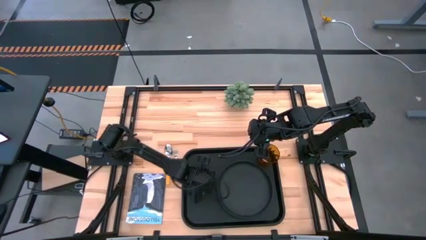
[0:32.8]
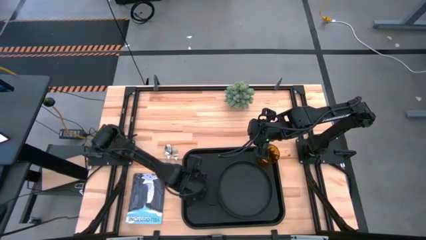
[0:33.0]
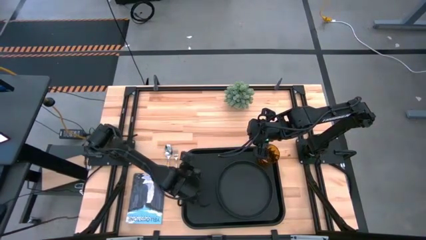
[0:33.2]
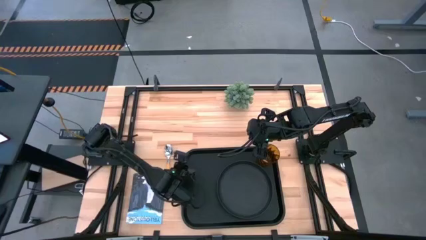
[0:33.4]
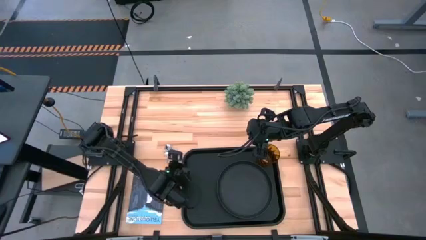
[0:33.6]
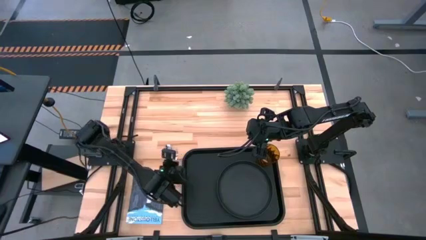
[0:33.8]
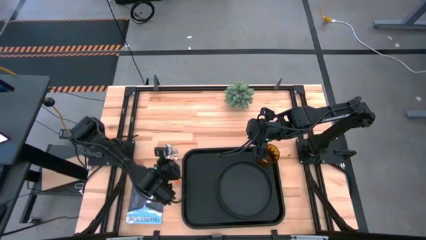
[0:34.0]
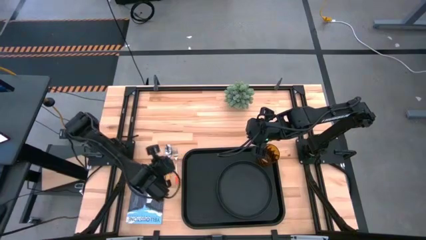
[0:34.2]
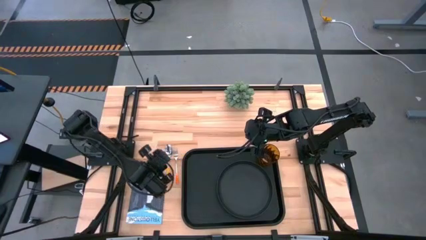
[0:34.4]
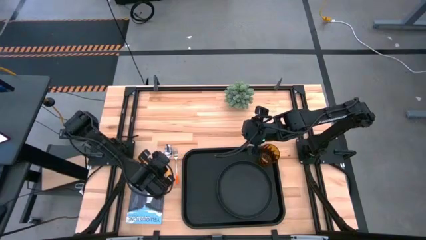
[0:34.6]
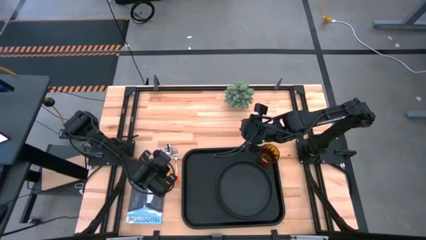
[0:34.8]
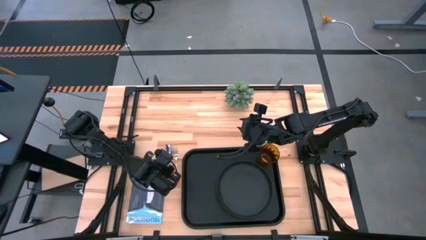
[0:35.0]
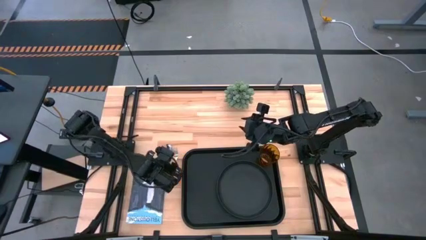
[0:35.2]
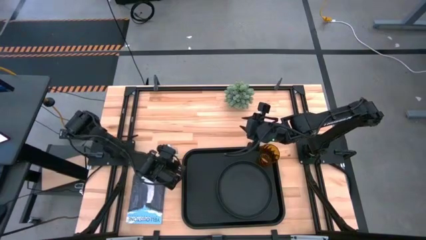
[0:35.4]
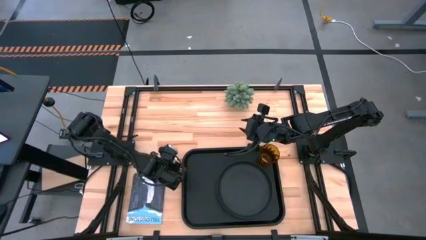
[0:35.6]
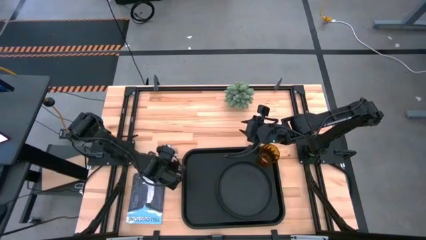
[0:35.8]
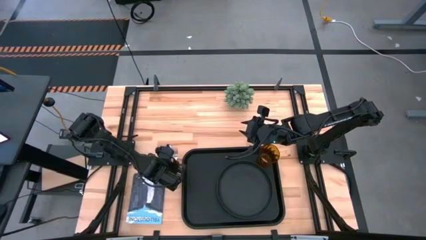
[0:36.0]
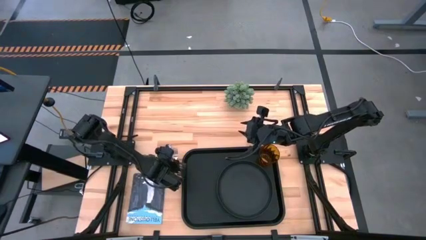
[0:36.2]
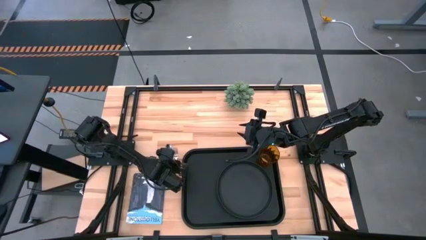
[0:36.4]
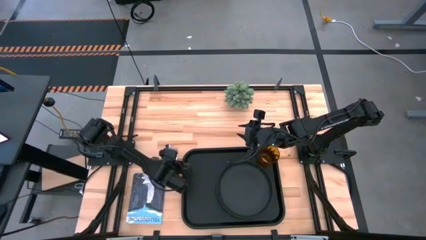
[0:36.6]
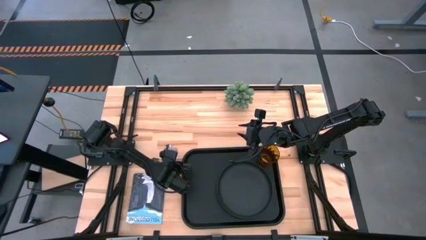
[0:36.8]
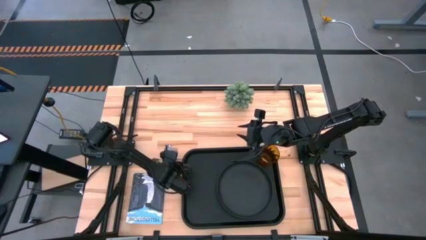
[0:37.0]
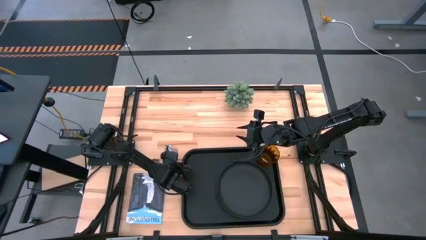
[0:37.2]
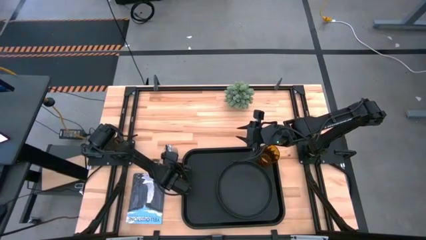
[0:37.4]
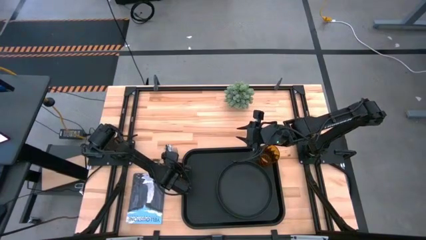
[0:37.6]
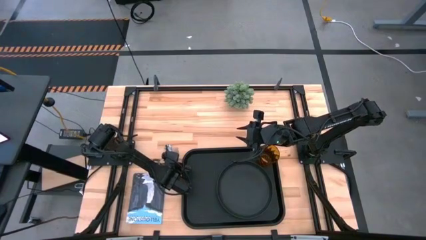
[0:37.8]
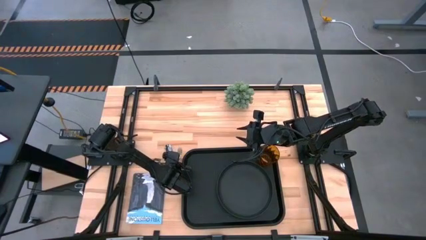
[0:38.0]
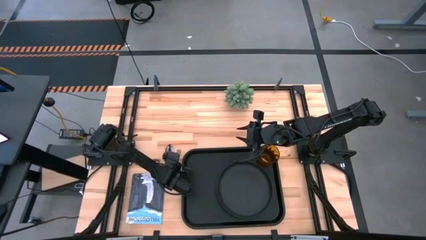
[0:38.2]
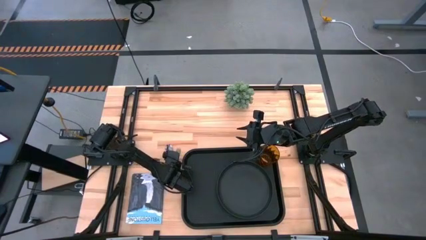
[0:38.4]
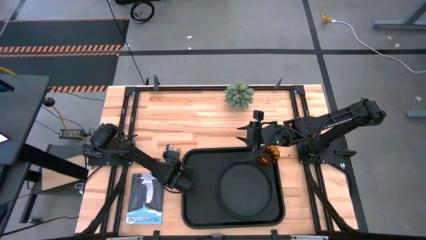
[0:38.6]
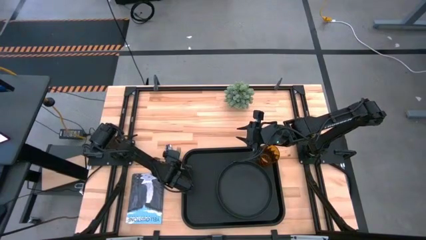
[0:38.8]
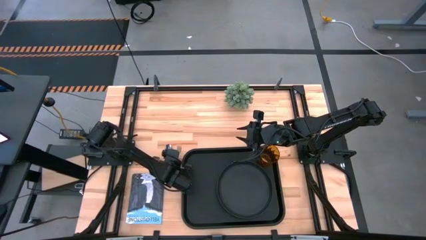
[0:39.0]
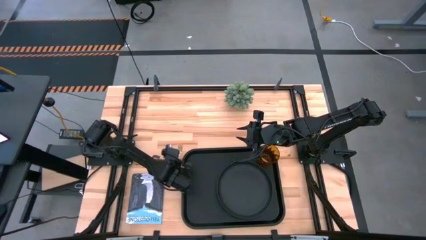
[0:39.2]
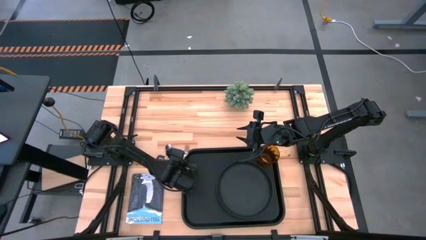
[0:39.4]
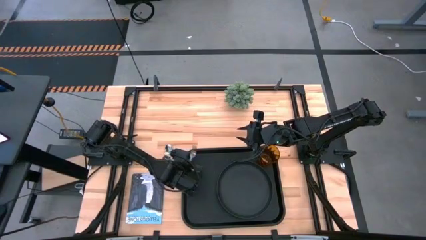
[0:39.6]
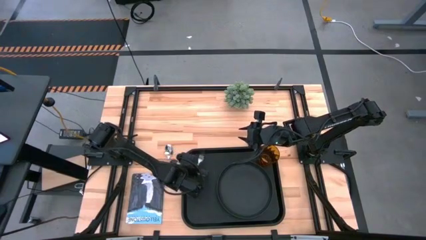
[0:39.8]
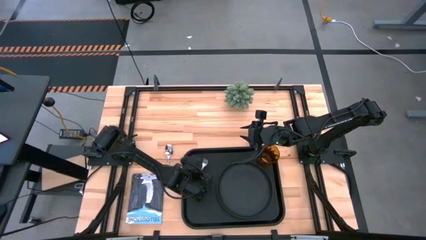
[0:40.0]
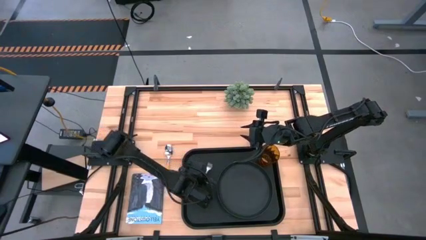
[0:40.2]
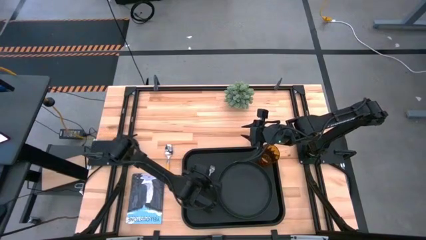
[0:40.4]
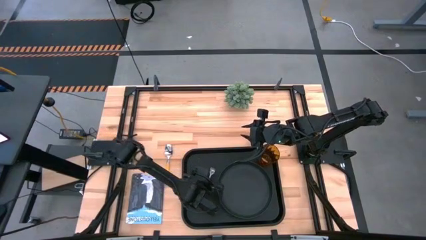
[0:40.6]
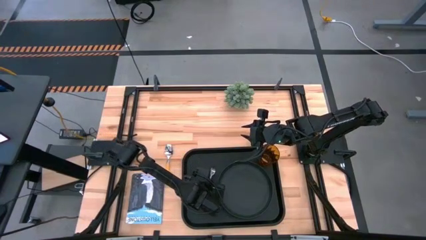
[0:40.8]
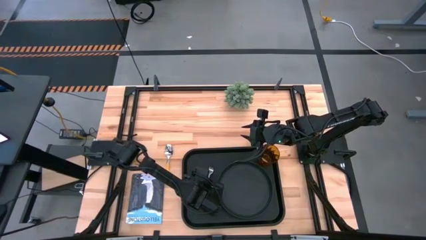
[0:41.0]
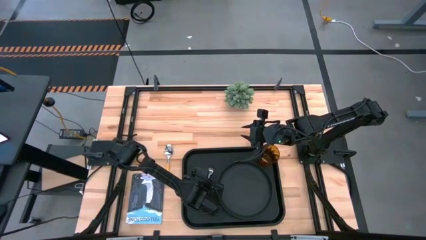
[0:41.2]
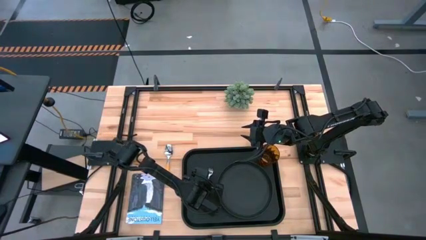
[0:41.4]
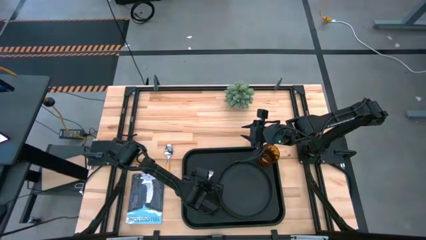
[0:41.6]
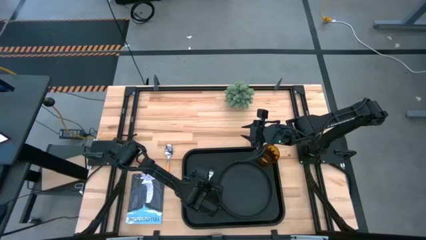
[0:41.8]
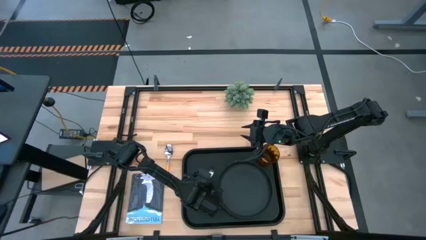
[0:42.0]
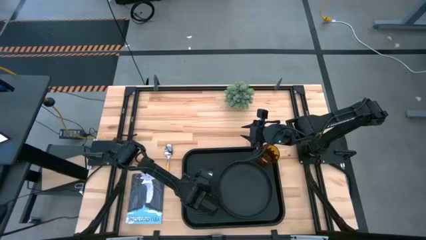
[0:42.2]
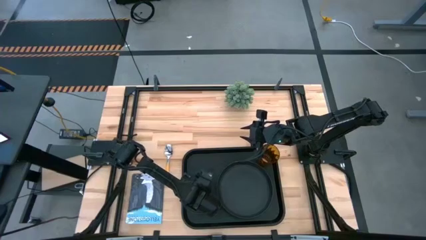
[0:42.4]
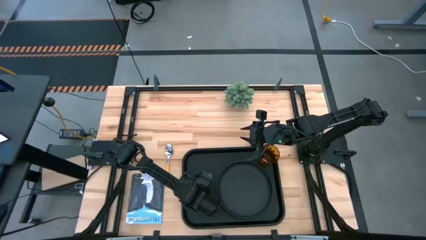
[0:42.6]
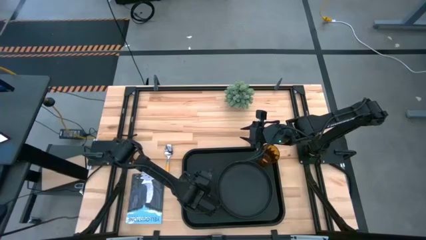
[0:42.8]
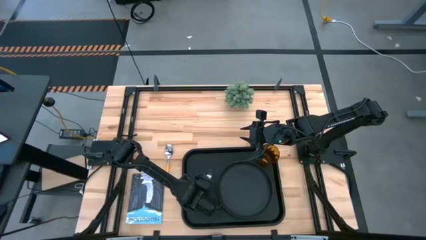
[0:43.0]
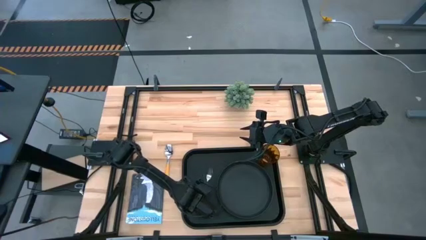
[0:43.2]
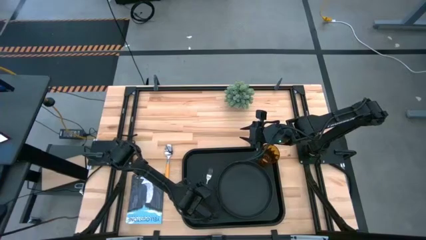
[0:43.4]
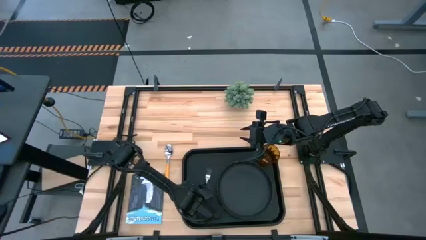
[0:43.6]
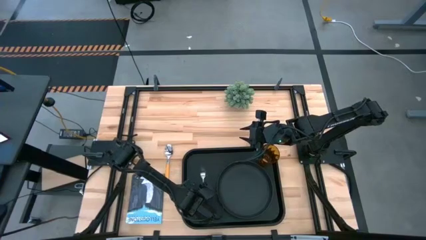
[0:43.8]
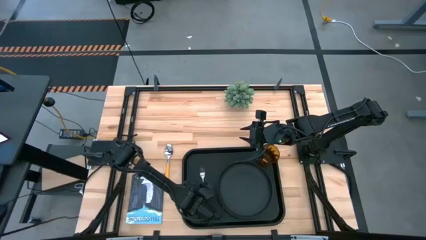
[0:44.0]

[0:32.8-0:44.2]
Task: Pick and place plate/cup/fork/spoon on tray
Put the orange fork on the left side of the black plate

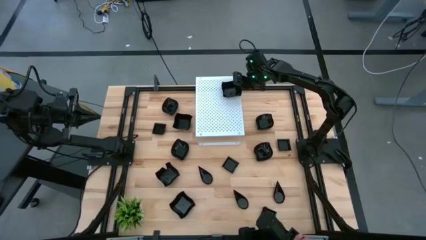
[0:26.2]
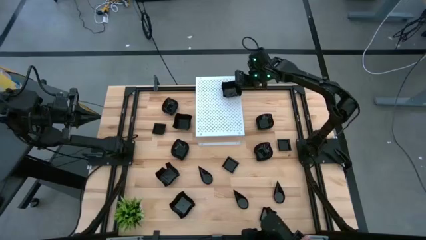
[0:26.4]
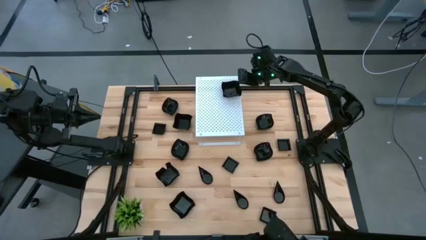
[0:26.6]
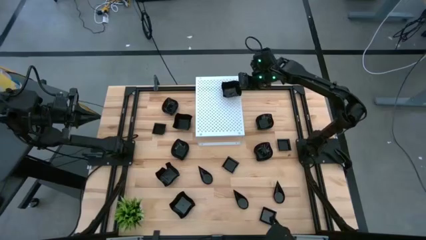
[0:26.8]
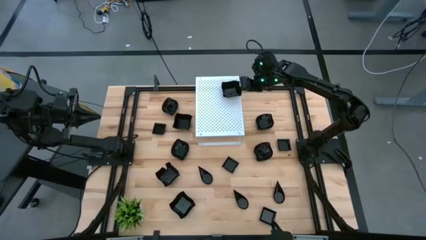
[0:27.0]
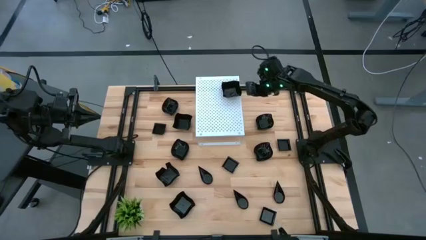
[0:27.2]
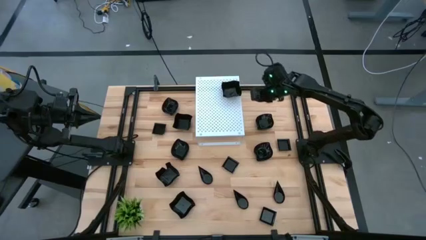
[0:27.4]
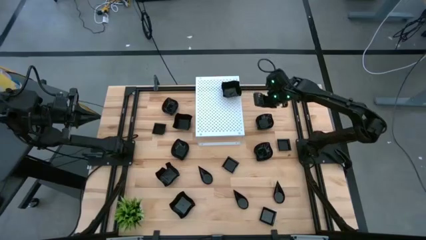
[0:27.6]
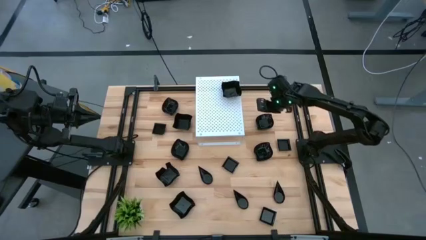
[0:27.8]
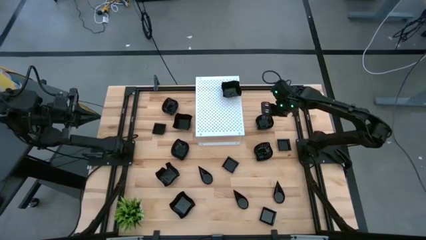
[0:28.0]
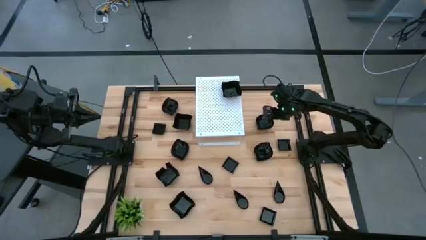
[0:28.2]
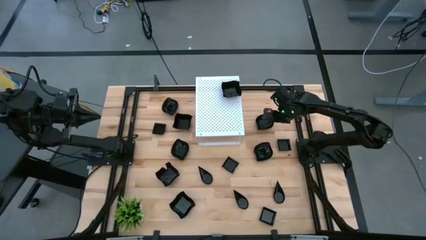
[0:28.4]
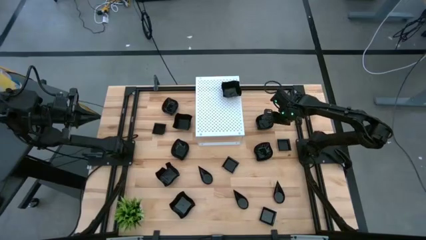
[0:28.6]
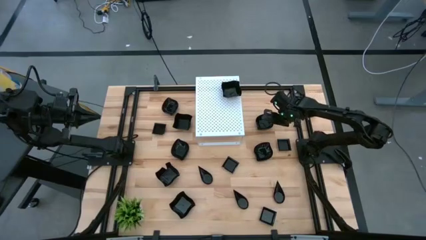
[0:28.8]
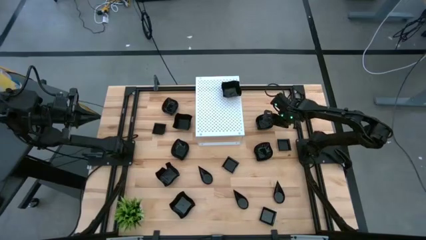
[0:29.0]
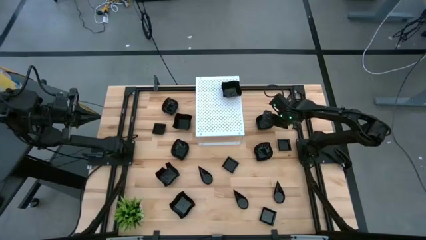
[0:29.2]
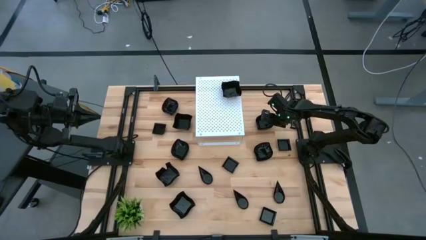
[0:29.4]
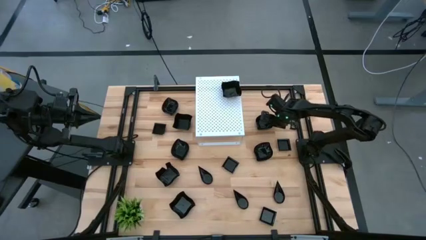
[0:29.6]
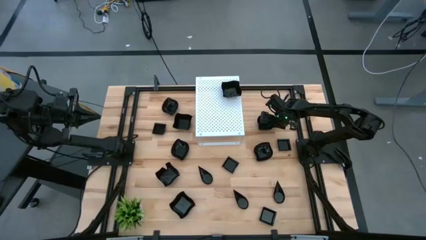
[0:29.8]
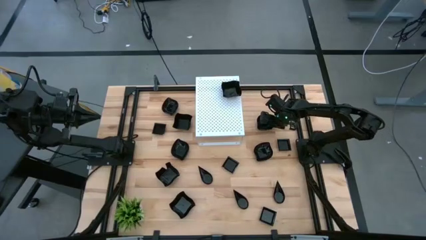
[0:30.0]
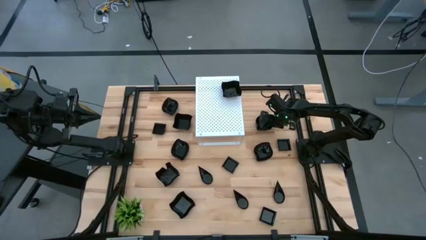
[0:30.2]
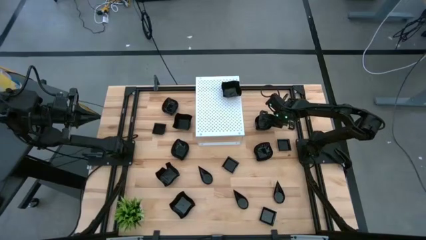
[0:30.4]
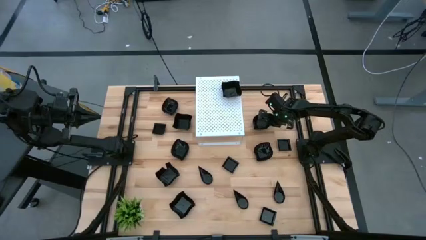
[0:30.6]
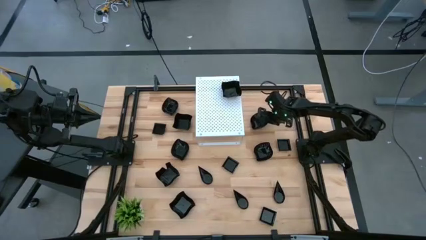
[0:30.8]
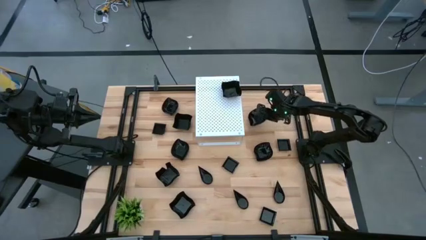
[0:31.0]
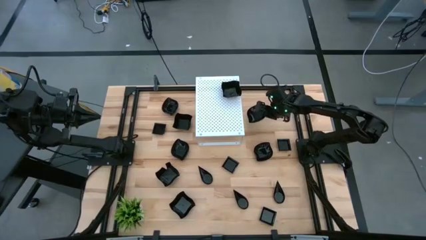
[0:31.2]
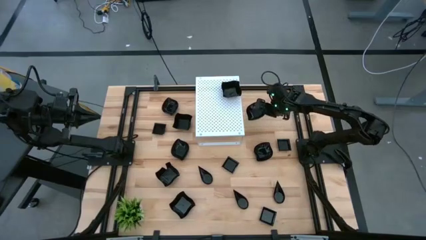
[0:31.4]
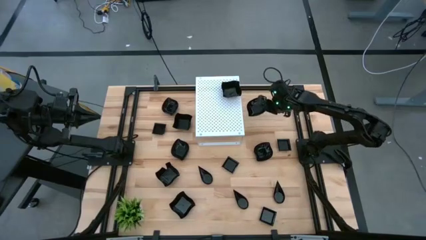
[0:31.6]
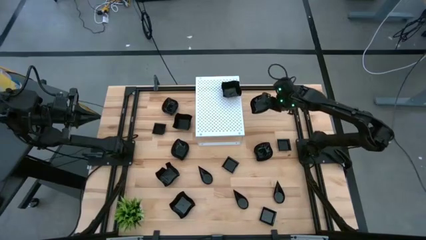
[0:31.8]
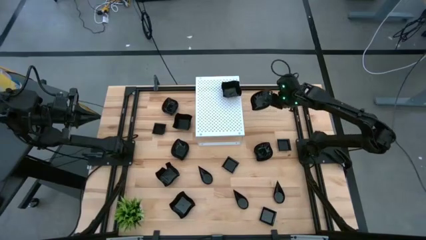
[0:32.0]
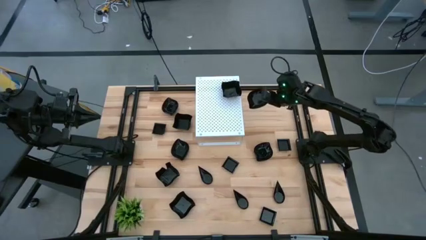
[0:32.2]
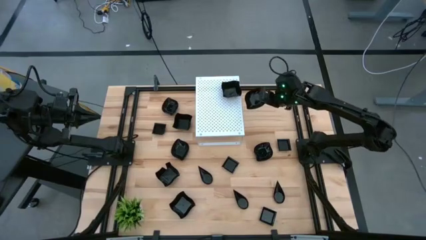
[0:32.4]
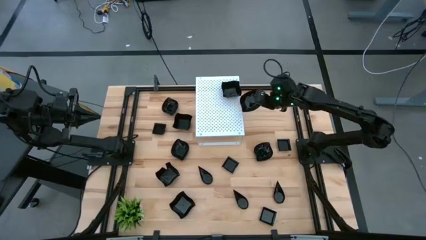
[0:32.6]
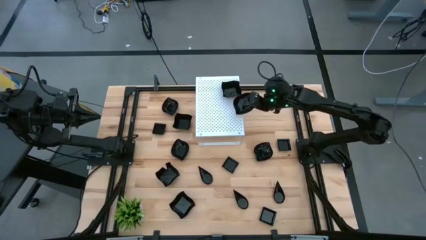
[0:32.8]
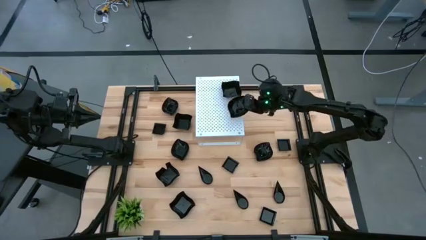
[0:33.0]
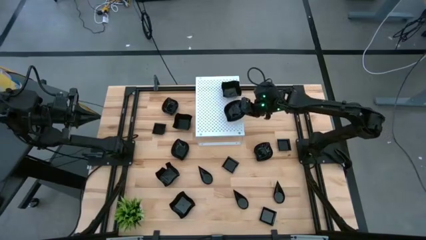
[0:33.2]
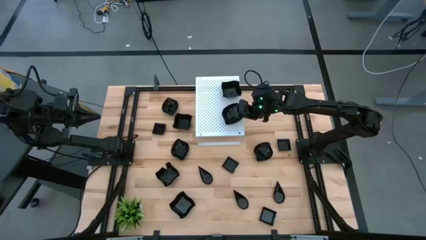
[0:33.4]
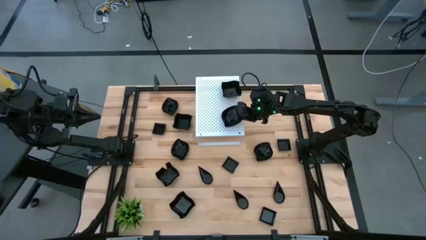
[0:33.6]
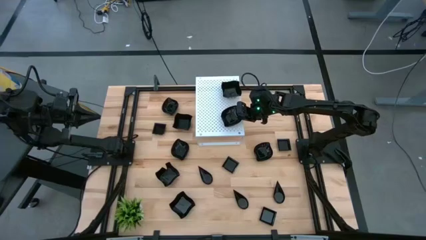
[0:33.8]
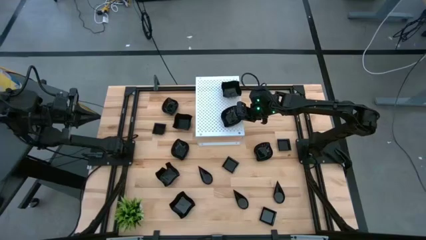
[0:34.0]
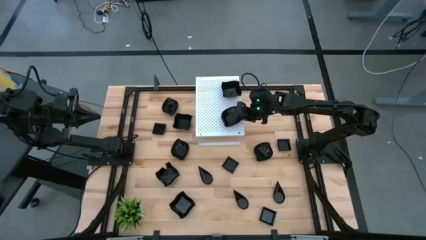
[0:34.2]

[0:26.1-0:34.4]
Task: Pick & Place Mini shaped plates
Put the leaf-shaped plate on the shelf
